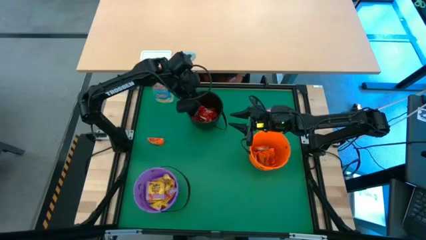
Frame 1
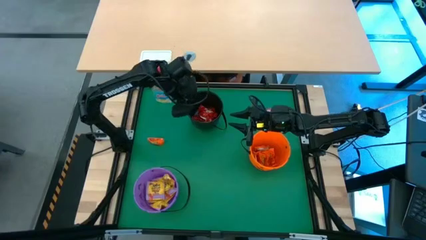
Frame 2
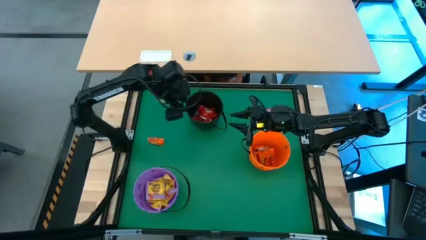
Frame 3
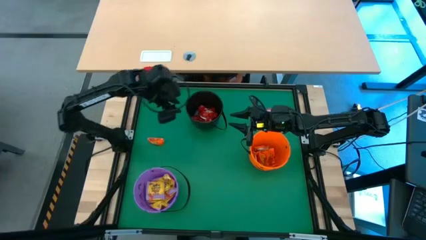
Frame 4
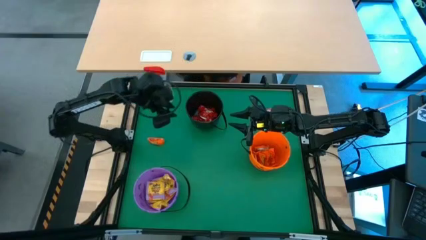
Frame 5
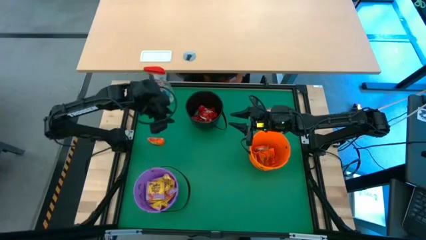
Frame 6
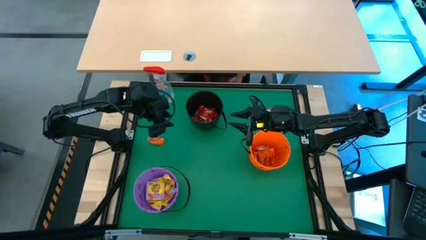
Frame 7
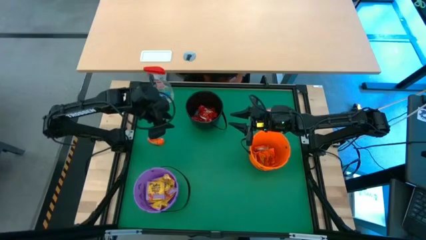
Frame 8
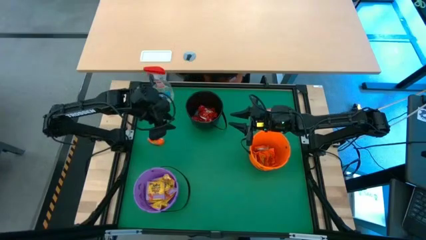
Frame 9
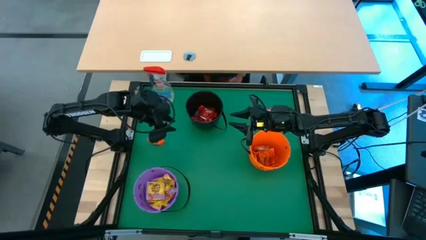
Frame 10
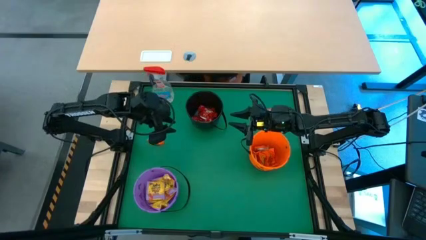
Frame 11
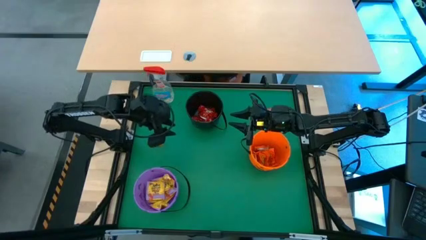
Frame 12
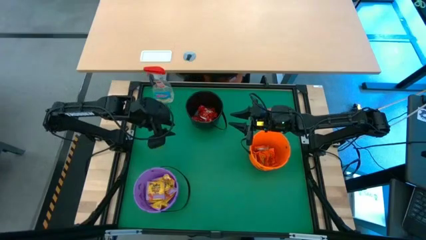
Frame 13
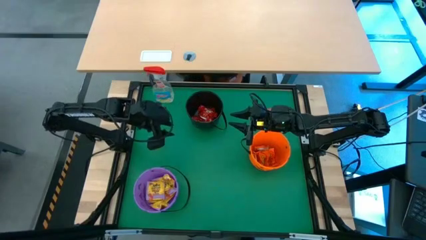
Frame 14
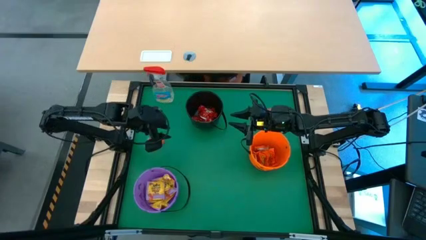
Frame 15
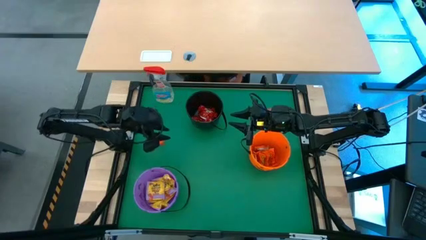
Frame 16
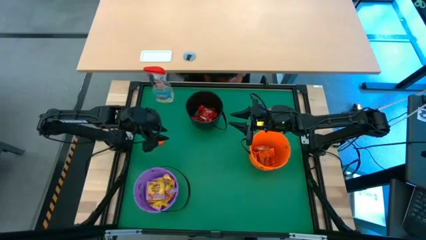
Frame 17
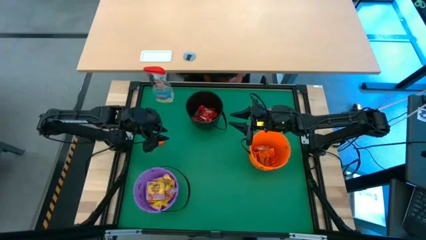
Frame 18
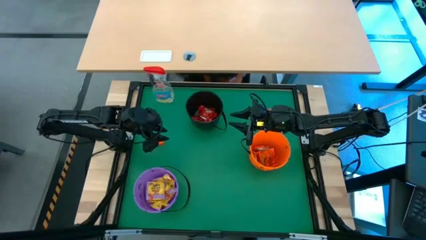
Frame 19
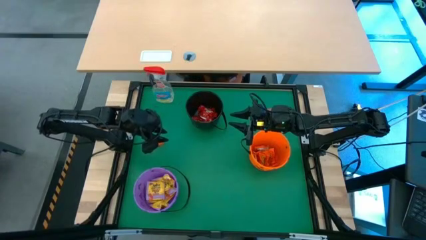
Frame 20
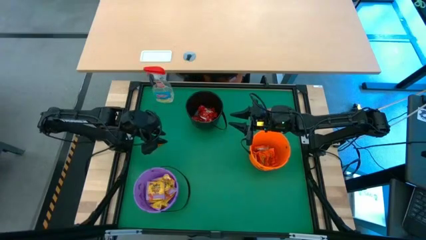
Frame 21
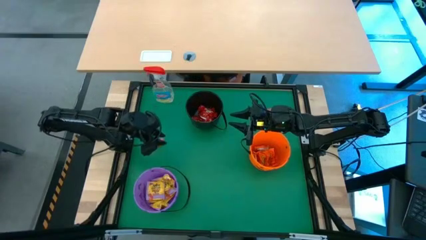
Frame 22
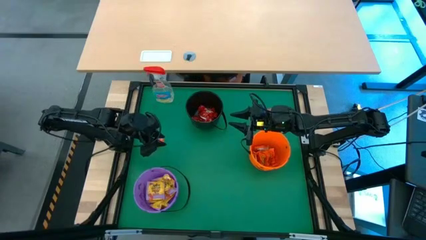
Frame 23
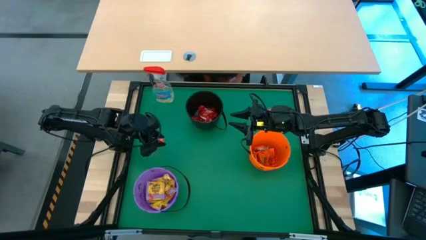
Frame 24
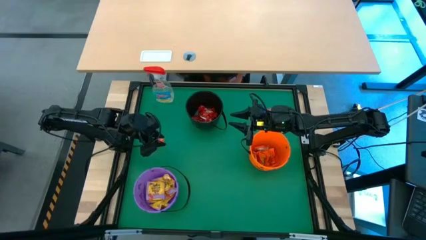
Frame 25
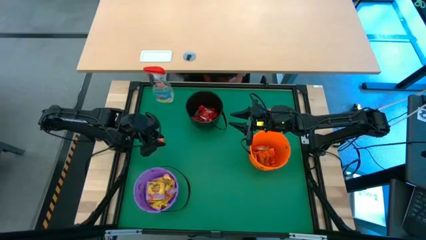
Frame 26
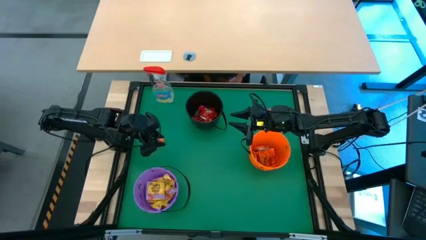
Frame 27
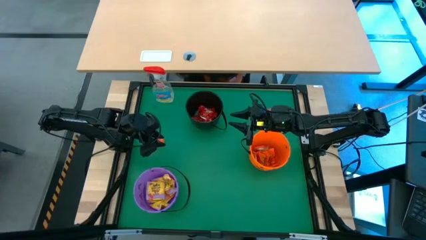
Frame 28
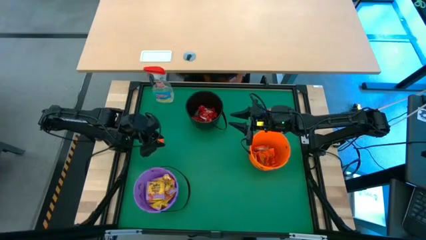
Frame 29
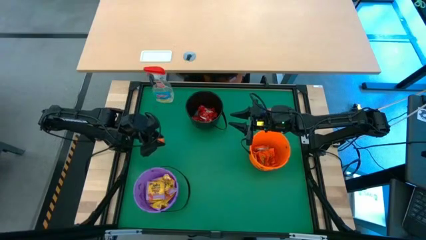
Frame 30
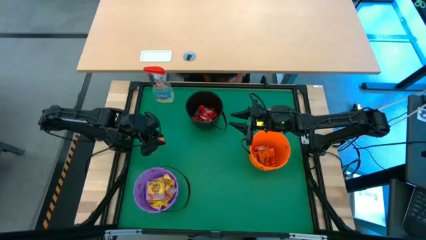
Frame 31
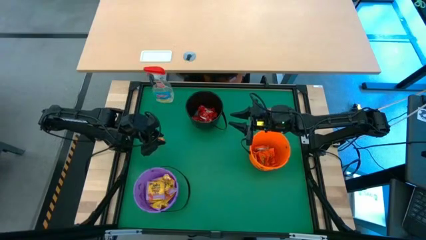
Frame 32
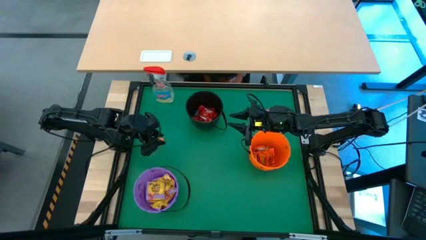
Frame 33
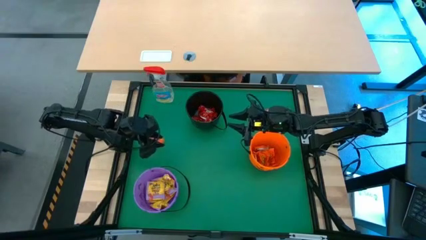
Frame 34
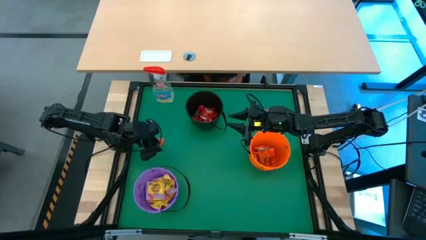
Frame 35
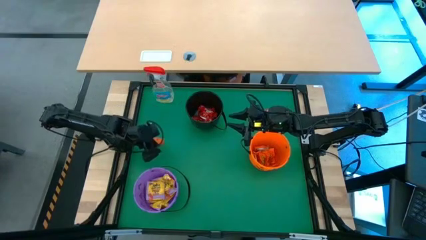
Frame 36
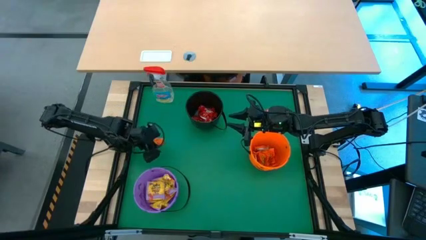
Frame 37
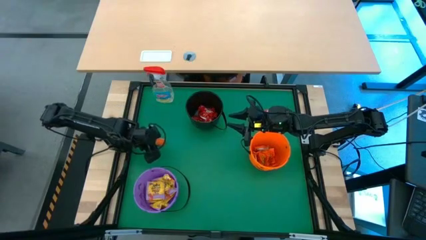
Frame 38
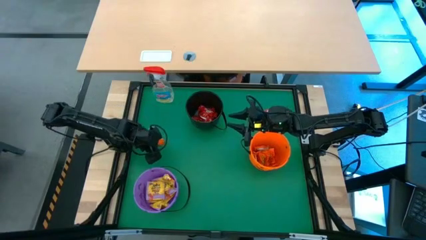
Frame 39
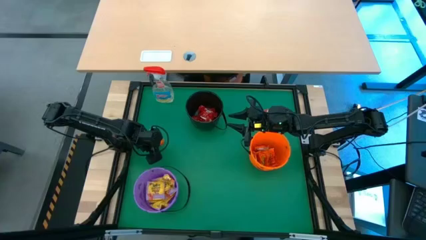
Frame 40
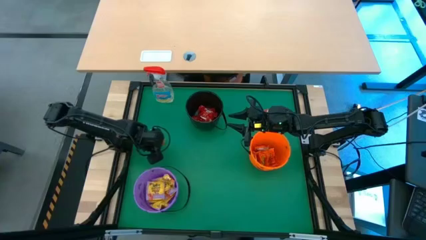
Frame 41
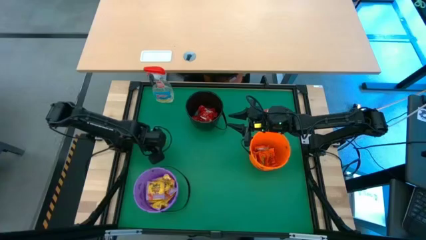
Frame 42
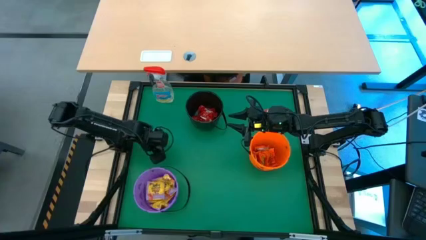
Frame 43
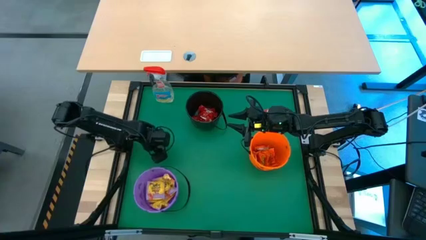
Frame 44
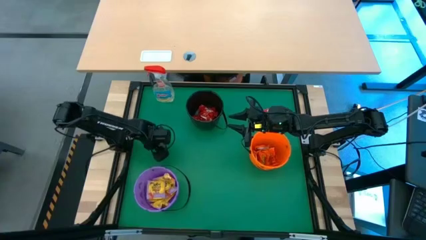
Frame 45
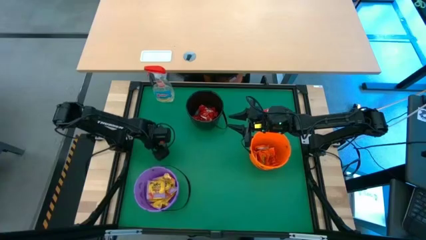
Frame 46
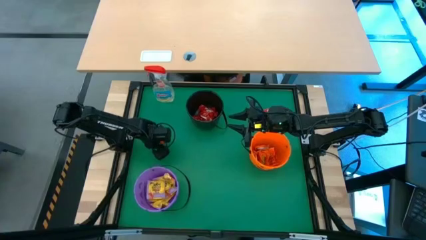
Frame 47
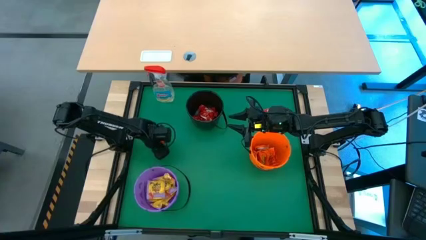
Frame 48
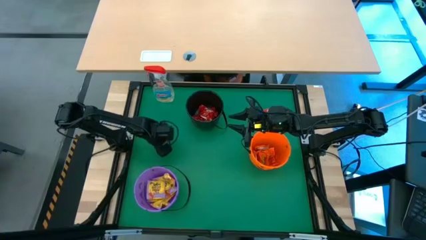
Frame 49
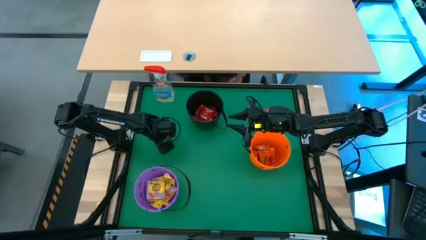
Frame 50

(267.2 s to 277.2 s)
Task: Sort candy
Put the orange candy into the orange bucket

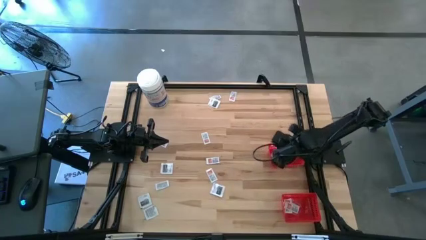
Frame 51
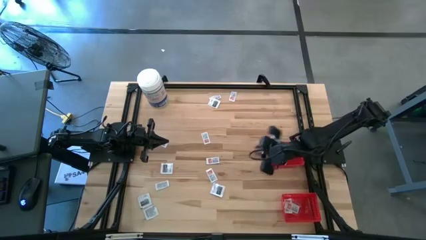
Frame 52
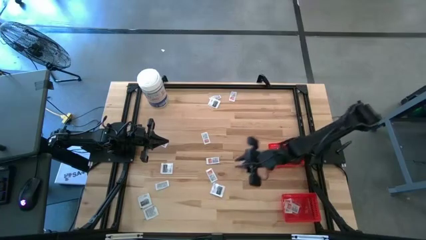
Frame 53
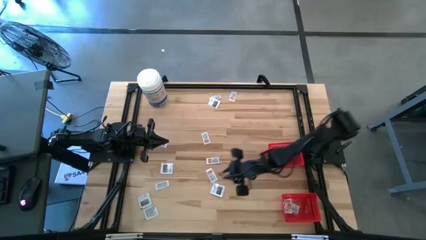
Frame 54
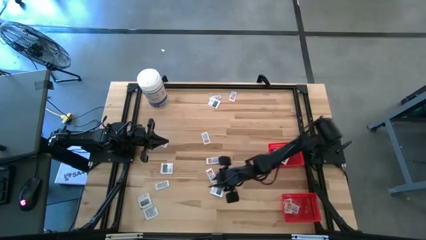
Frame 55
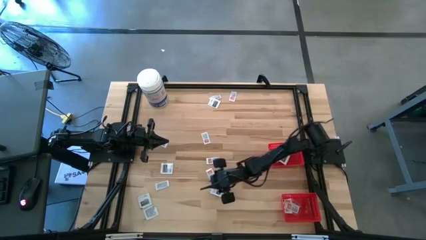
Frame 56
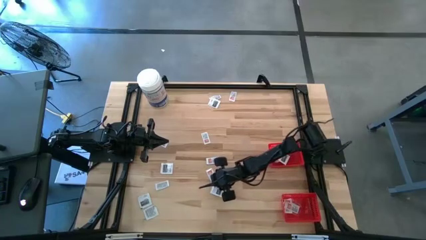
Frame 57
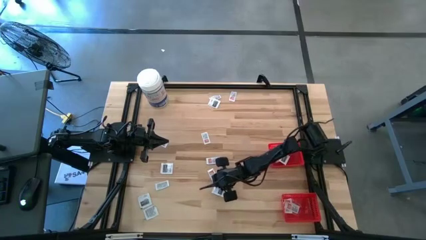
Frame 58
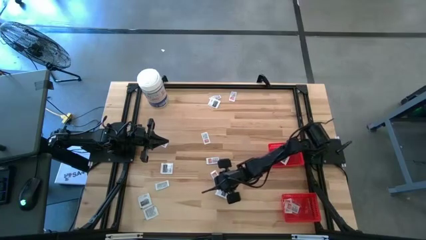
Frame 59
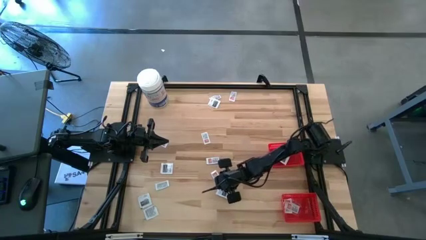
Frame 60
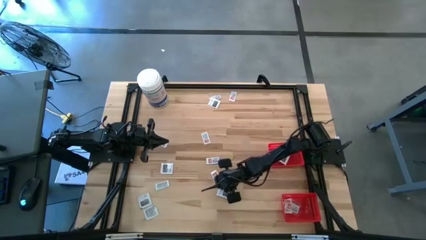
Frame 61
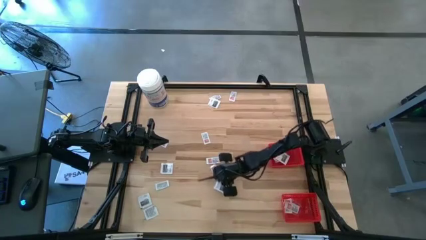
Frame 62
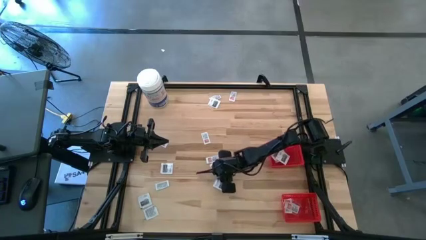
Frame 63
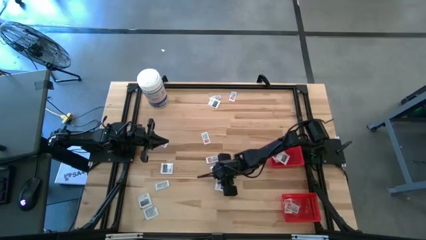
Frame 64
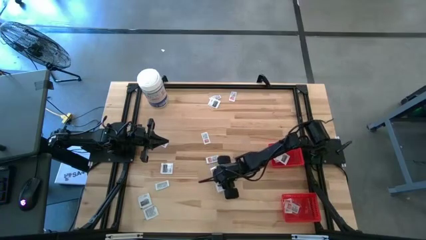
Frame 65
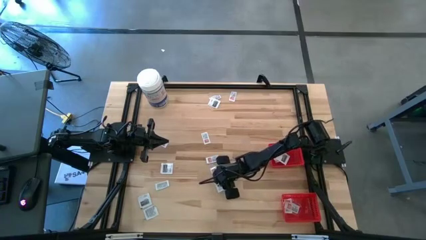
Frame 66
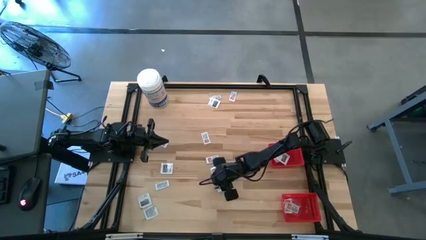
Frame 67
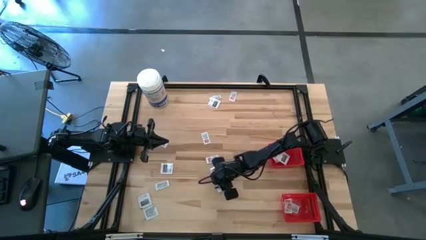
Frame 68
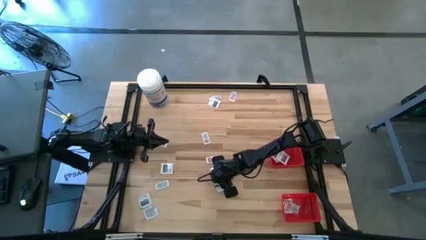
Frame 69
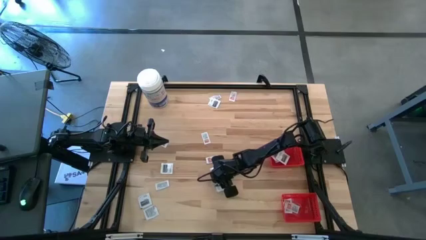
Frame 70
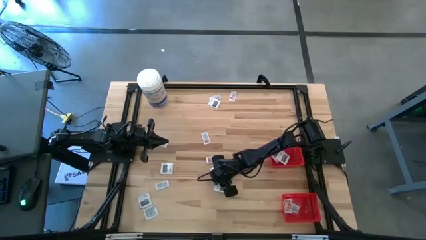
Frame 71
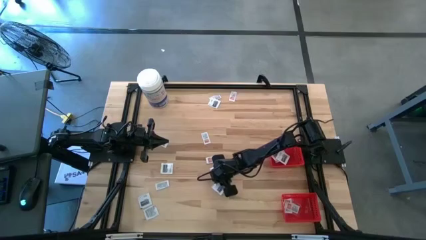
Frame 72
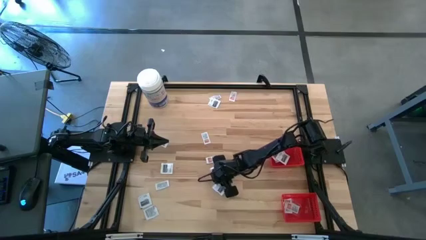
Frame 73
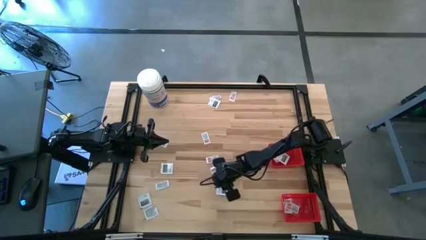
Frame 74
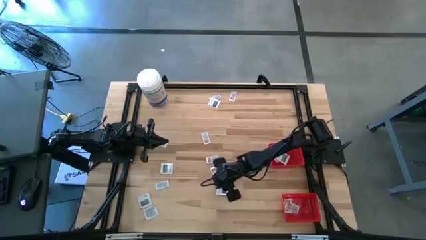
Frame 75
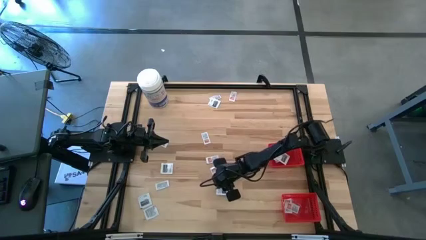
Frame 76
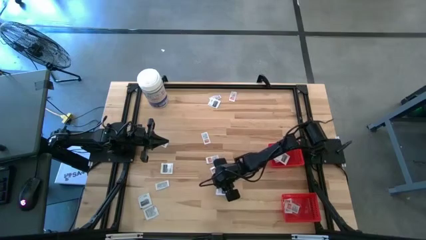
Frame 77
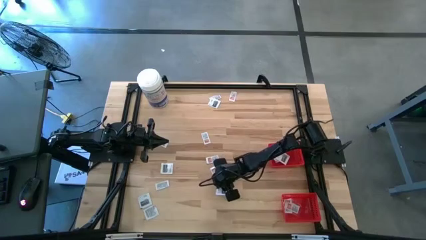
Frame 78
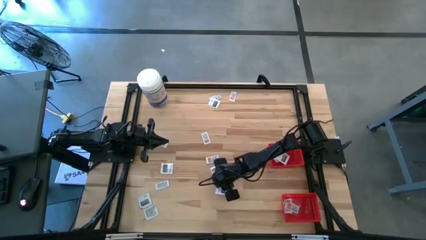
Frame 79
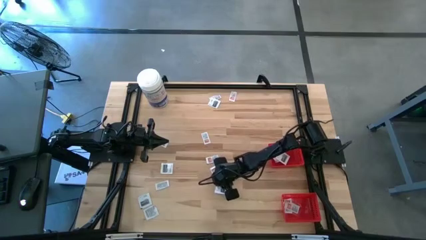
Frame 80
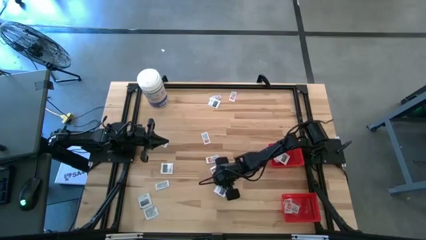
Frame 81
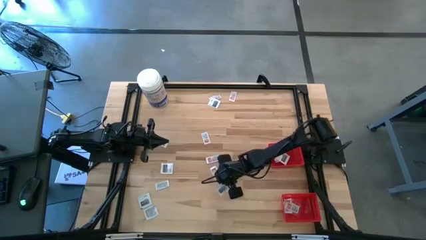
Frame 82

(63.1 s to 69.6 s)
Task: Pick & Place First Aid Supplies
Put the black towelette pack into the top red basket
